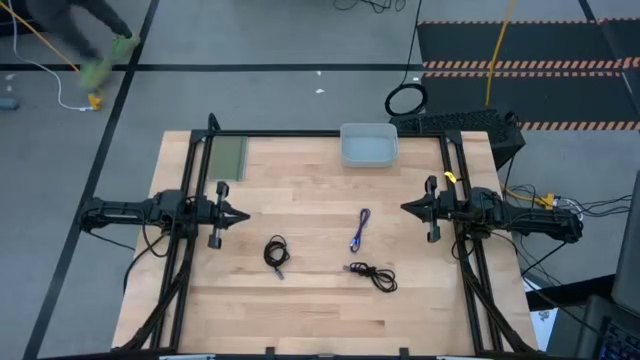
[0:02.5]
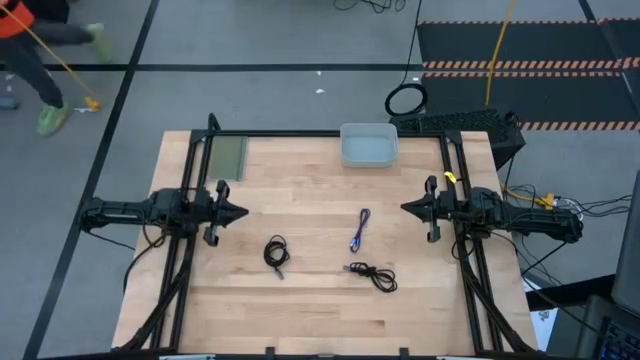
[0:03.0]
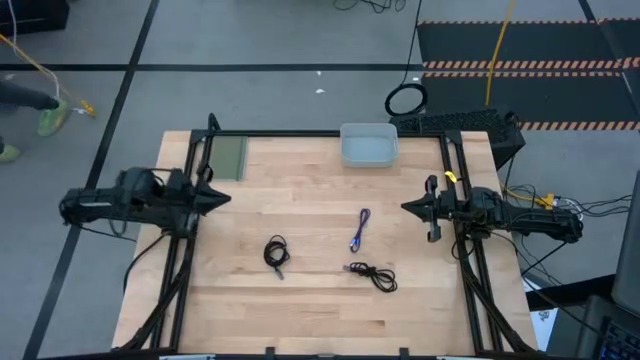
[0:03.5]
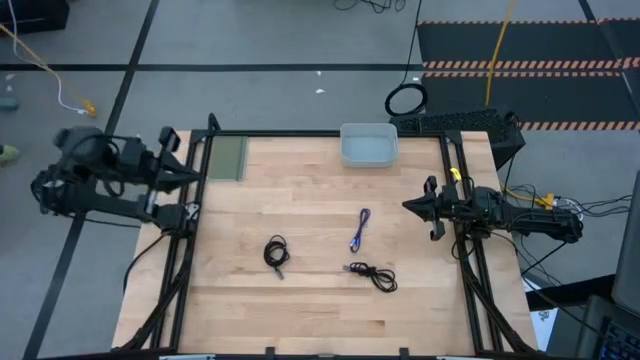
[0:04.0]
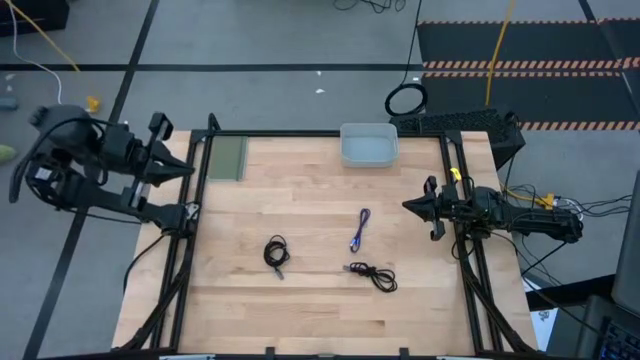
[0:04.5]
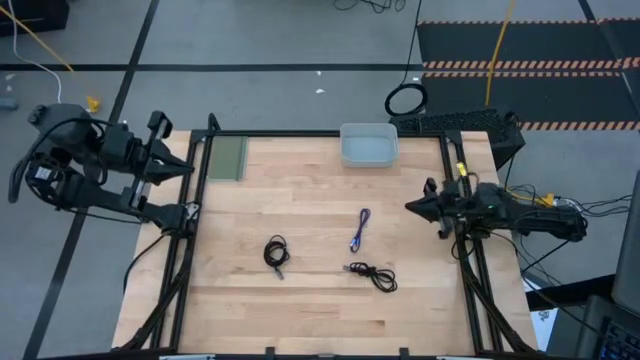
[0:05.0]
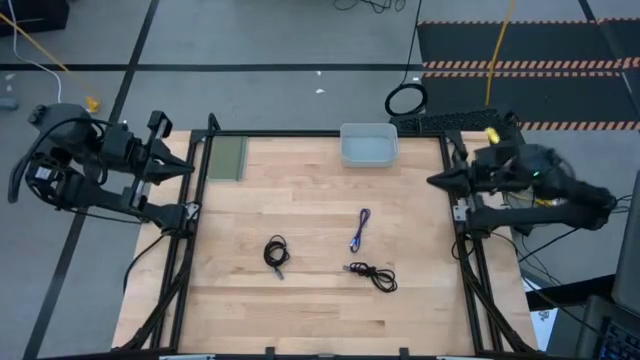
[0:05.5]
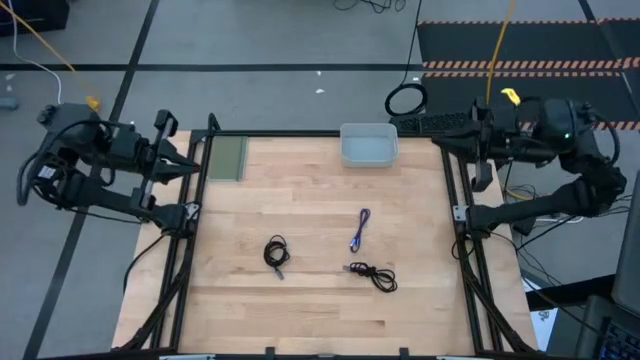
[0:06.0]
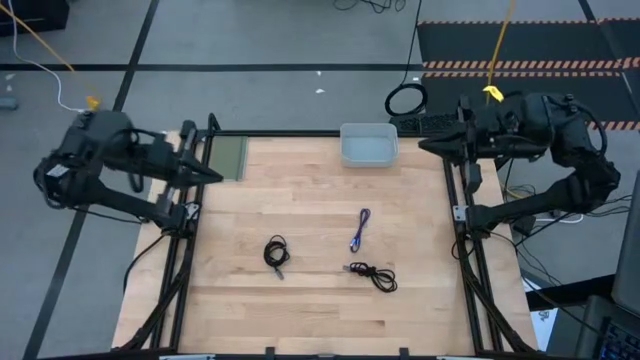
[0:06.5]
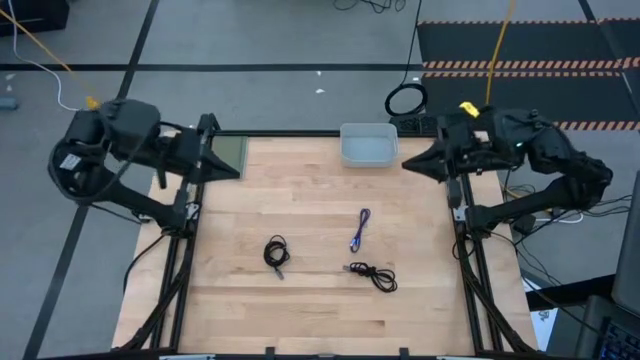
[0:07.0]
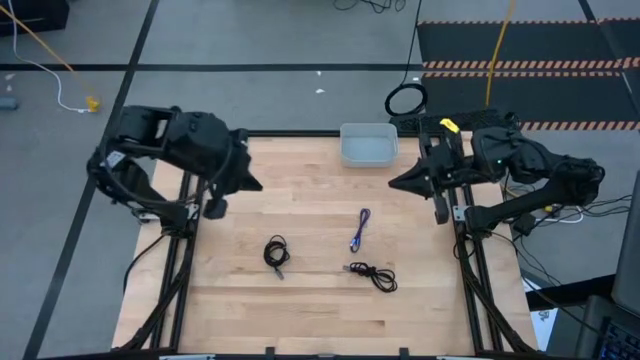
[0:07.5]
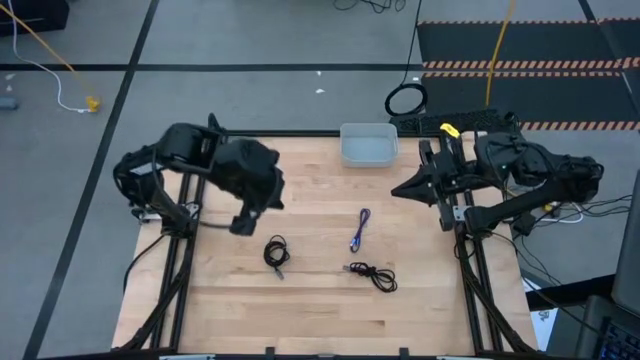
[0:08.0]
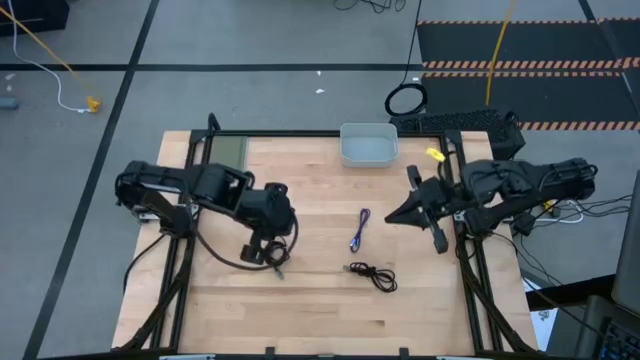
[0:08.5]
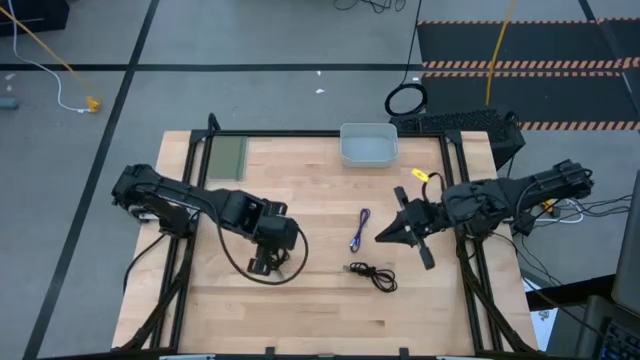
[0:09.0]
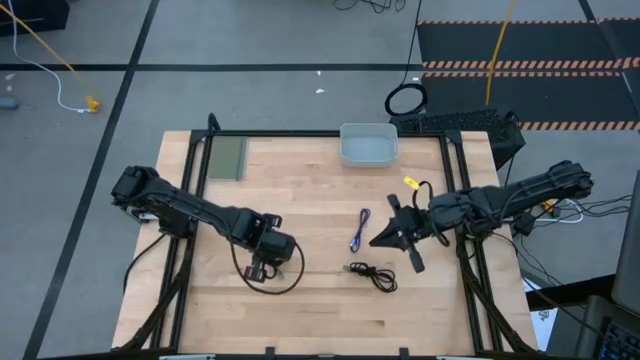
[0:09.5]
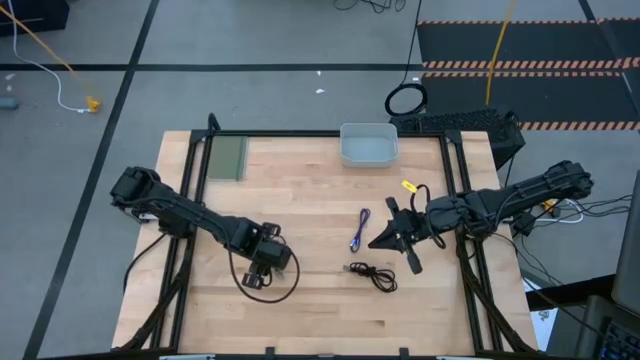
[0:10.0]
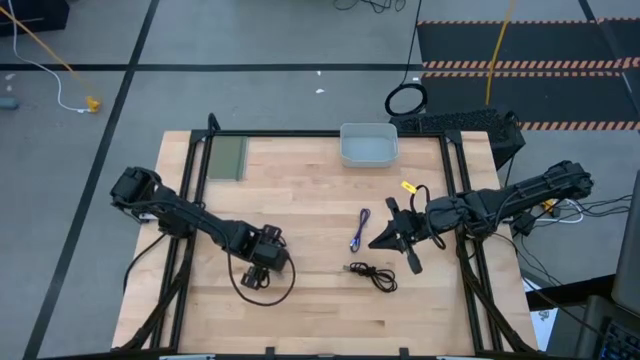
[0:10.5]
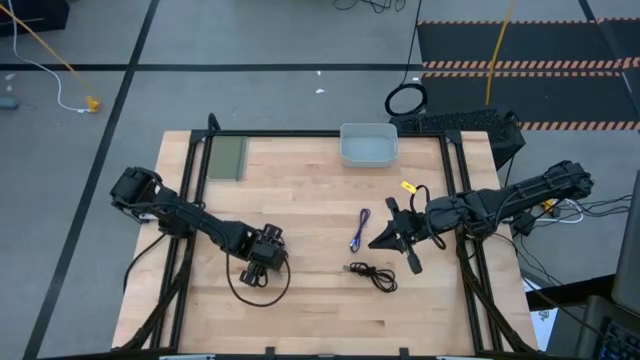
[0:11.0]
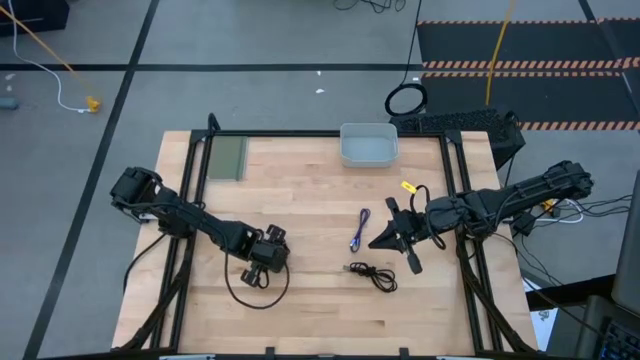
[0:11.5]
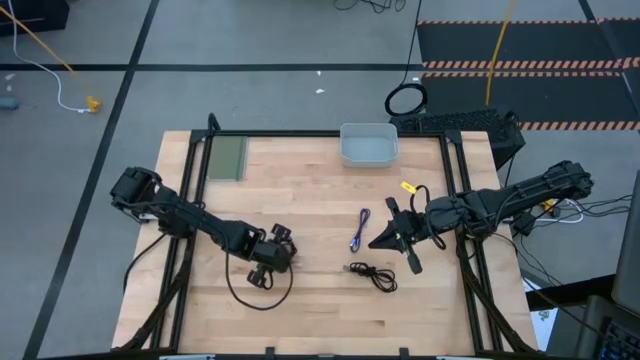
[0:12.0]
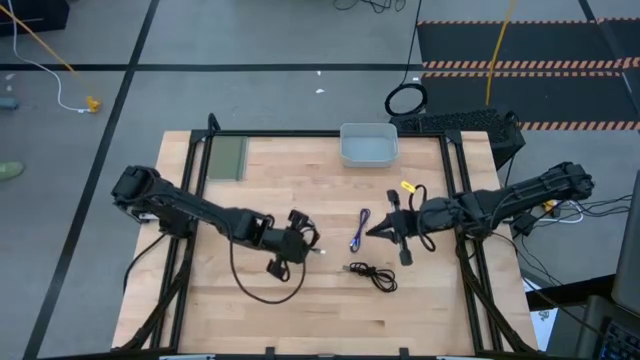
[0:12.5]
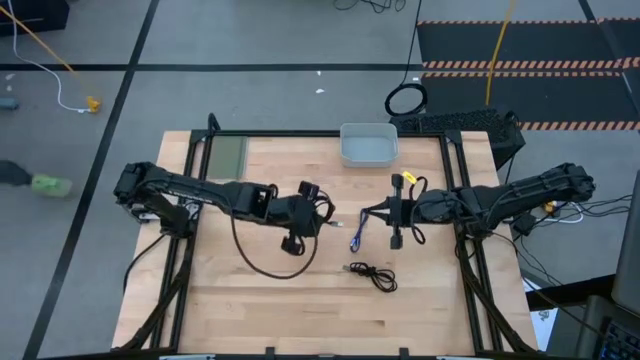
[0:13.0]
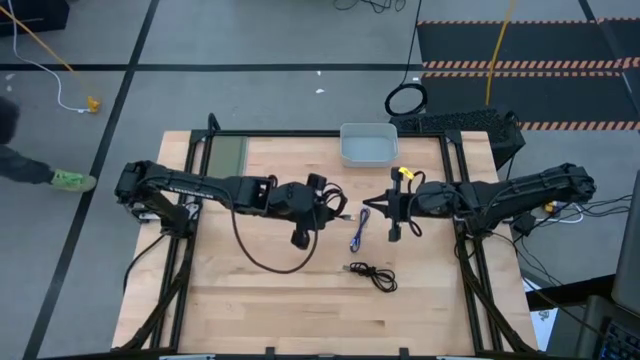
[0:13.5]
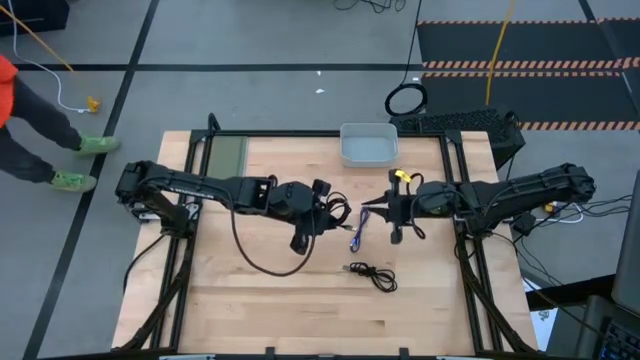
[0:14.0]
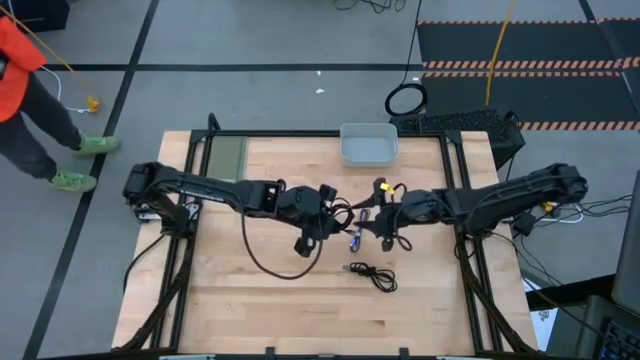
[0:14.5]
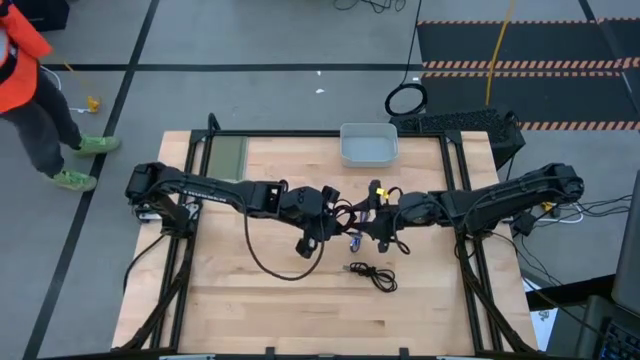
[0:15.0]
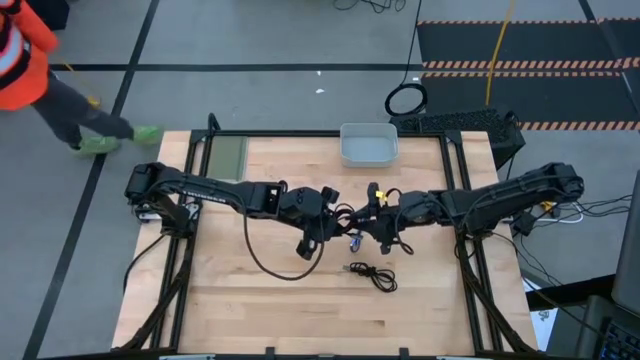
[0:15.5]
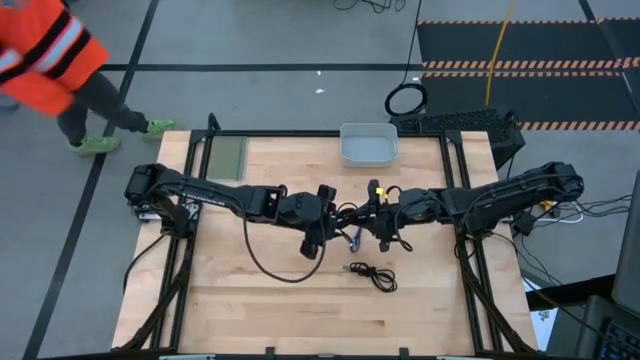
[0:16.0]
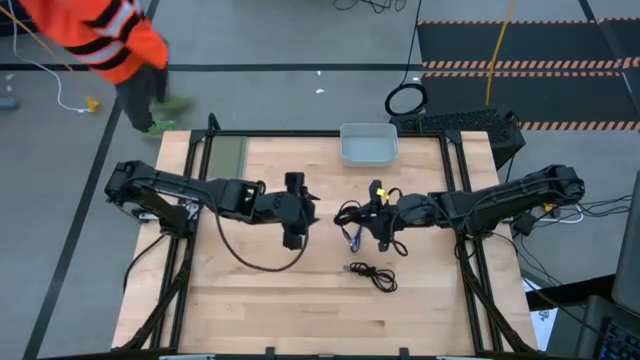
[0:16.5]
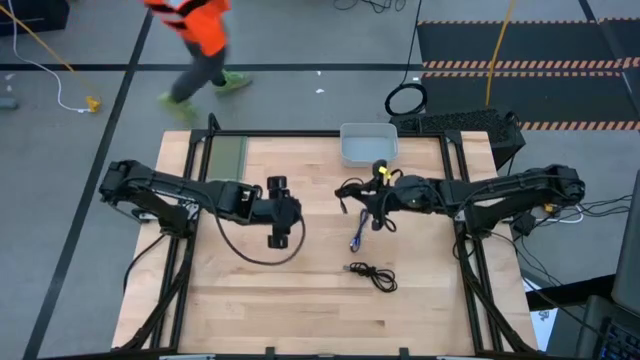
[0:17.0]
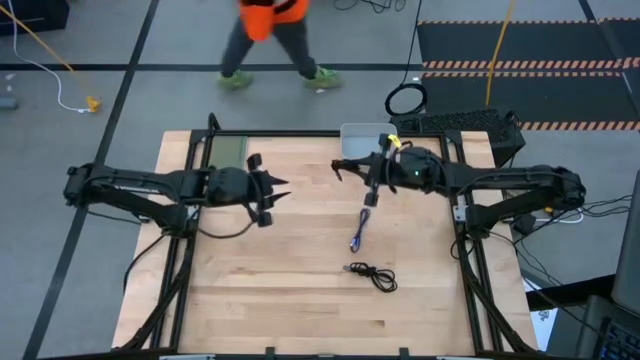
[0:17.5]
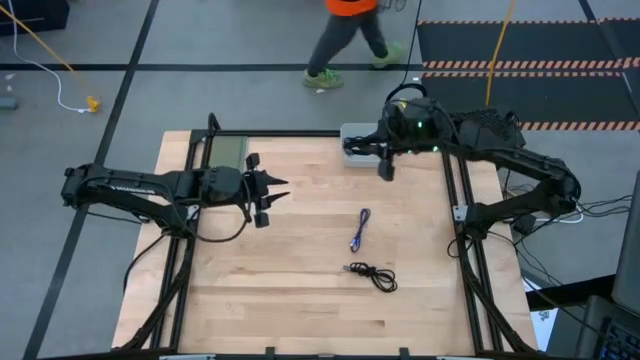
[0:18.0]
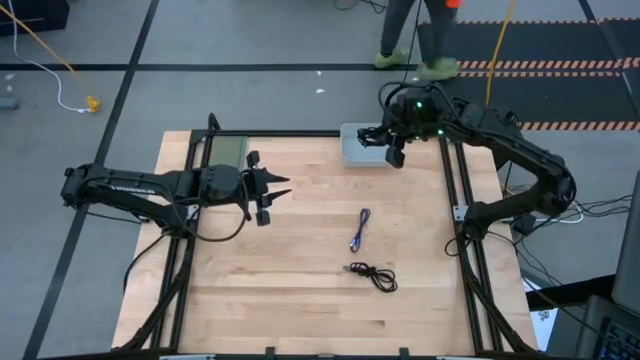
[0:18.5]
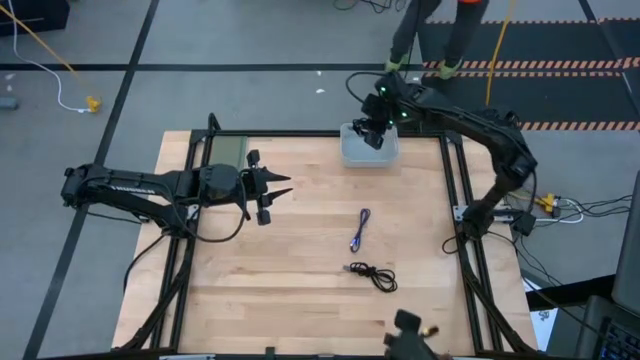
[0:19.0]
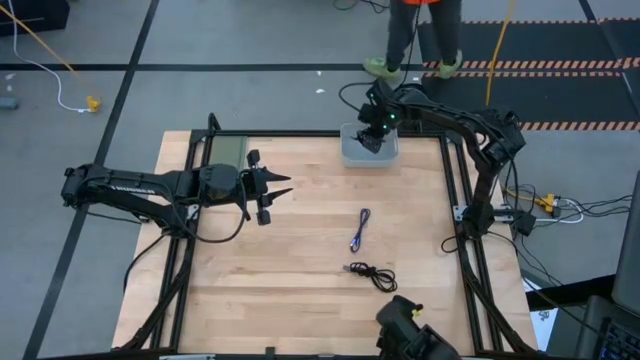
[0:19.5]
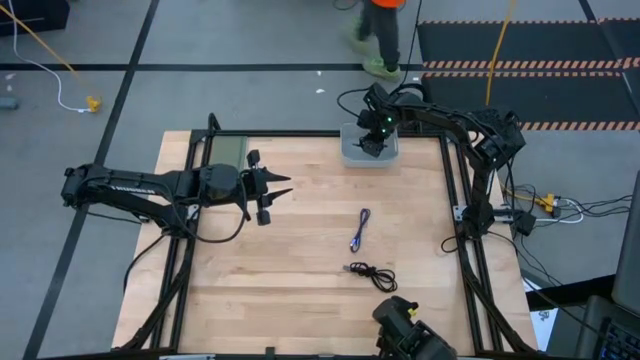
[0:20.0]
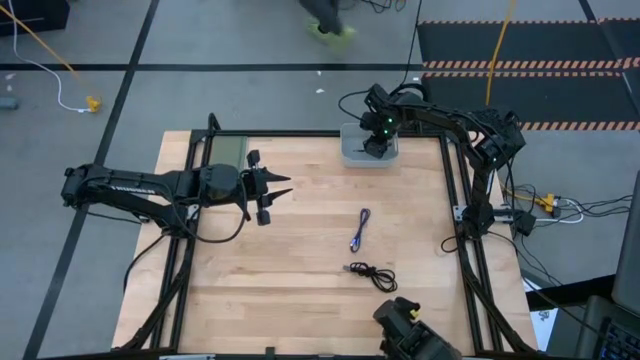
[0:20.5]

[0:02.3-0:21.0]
Task: Pick and place USB-C Cables
Put the left black charger cable into the white bin
